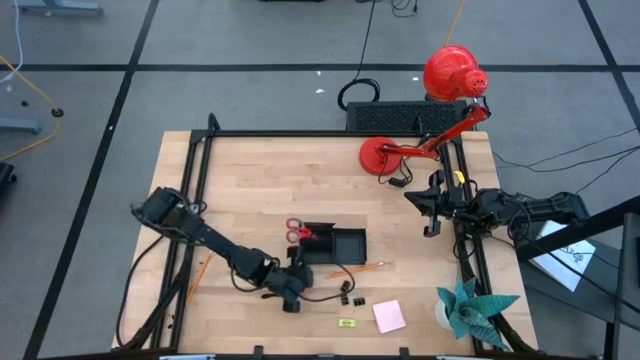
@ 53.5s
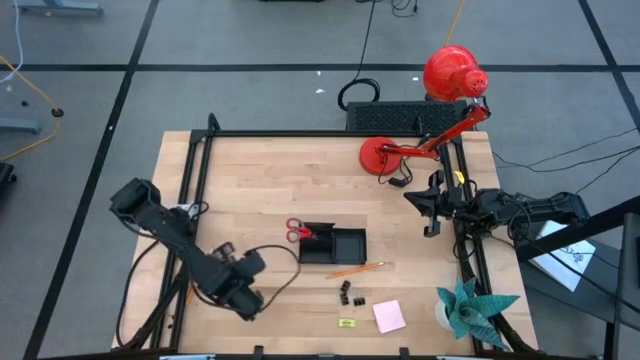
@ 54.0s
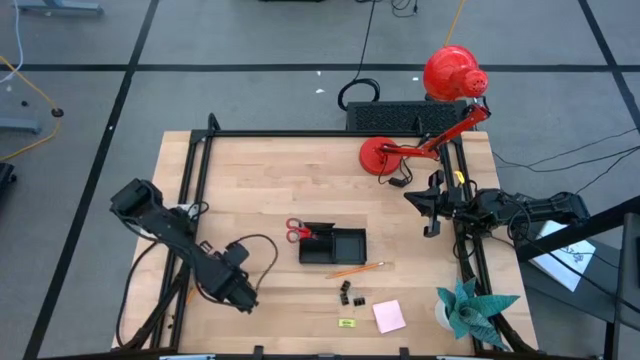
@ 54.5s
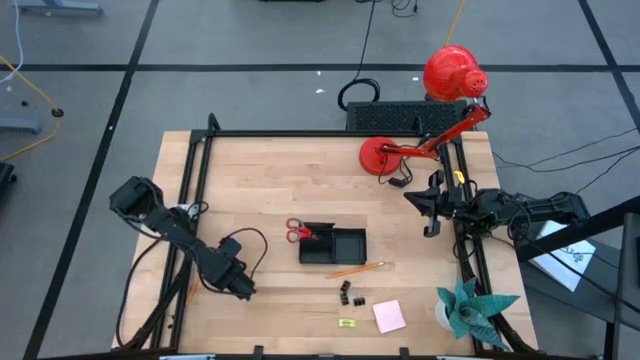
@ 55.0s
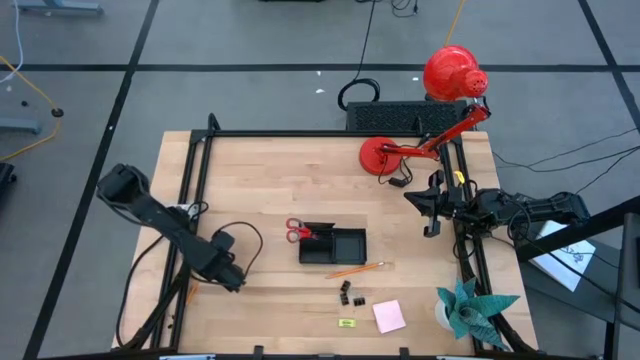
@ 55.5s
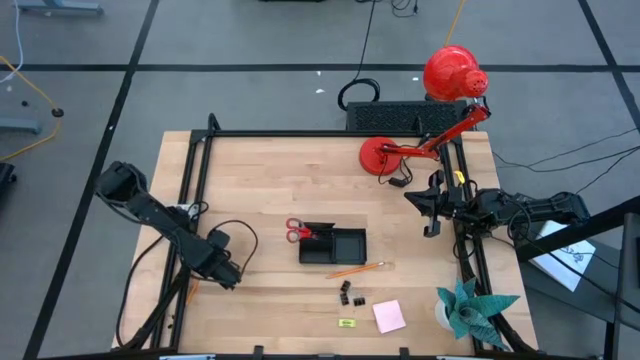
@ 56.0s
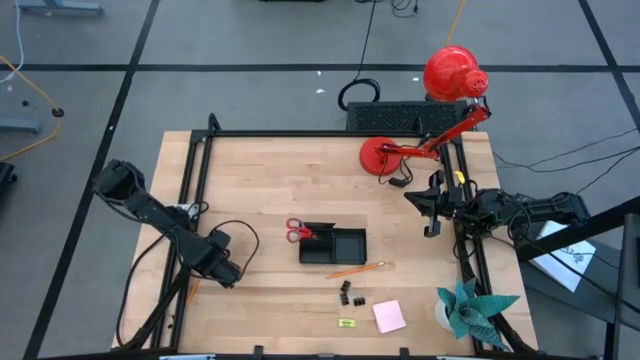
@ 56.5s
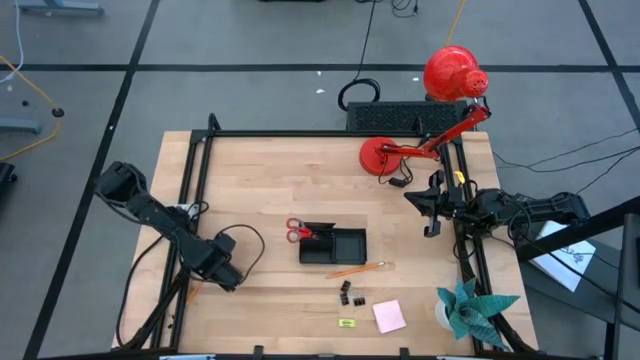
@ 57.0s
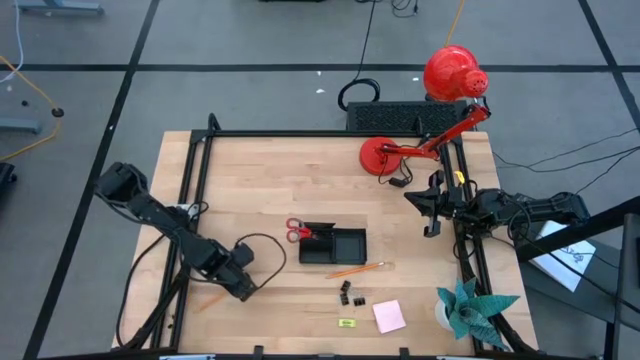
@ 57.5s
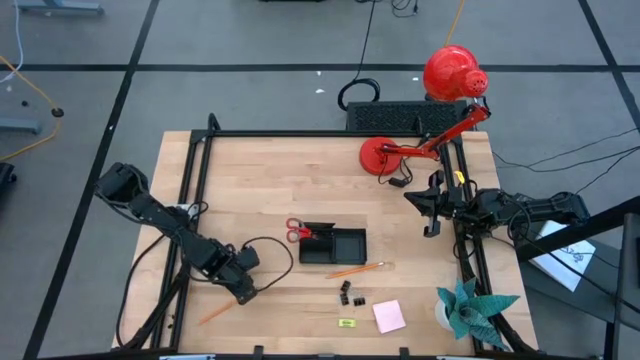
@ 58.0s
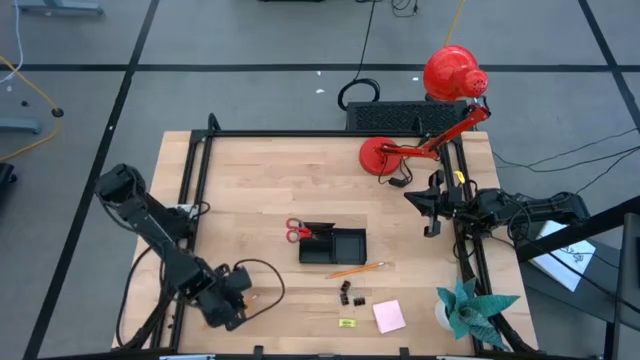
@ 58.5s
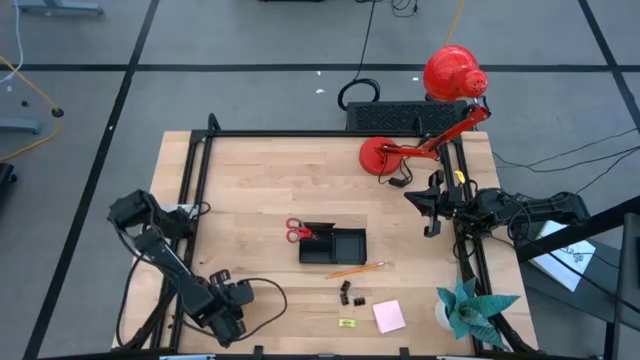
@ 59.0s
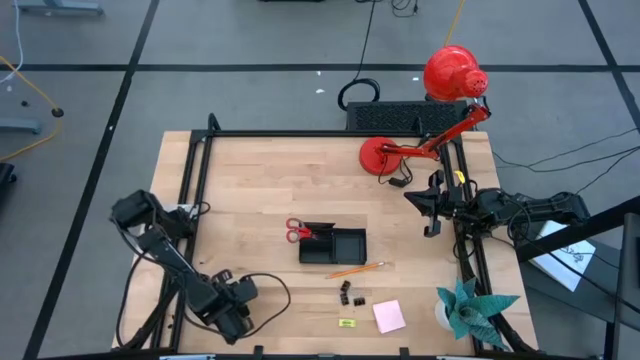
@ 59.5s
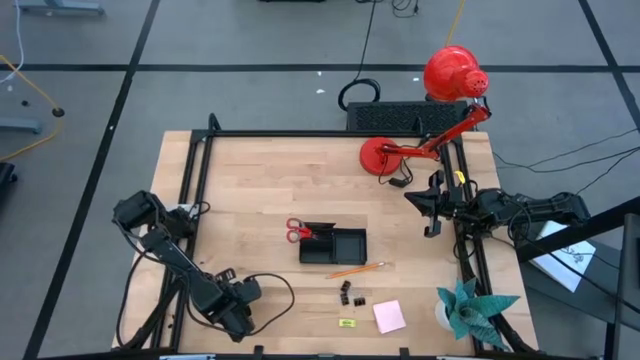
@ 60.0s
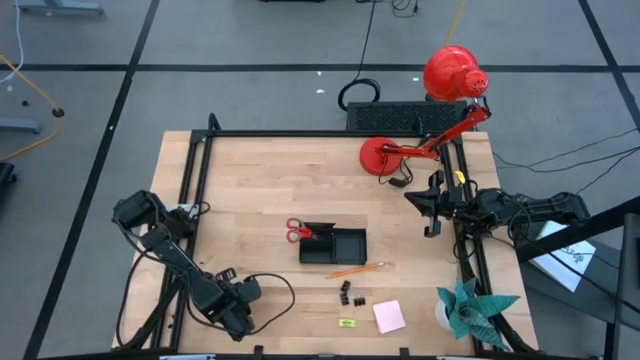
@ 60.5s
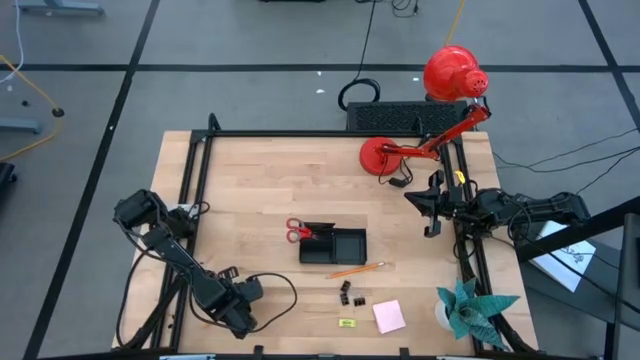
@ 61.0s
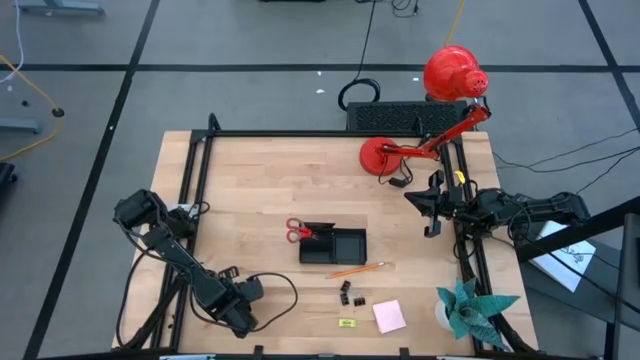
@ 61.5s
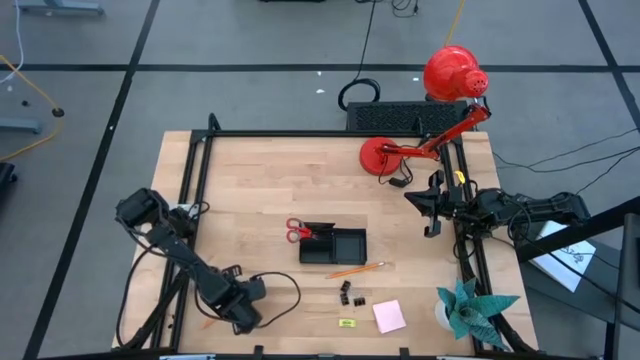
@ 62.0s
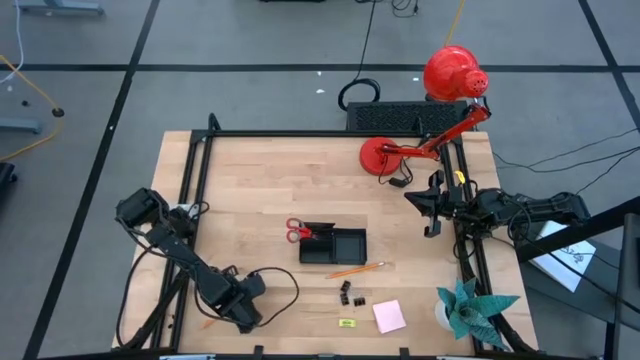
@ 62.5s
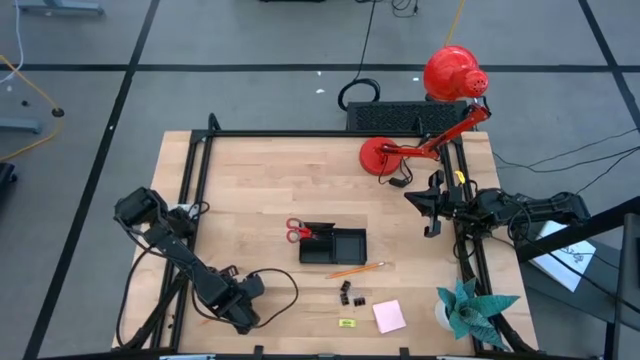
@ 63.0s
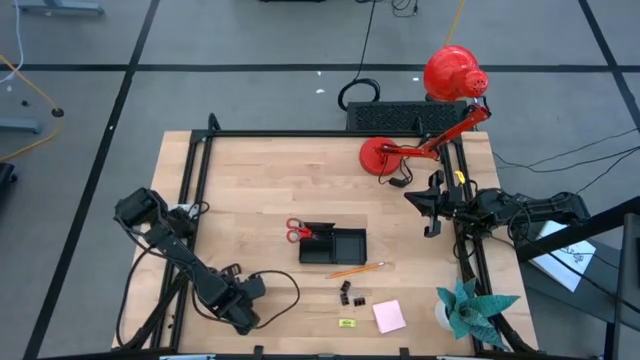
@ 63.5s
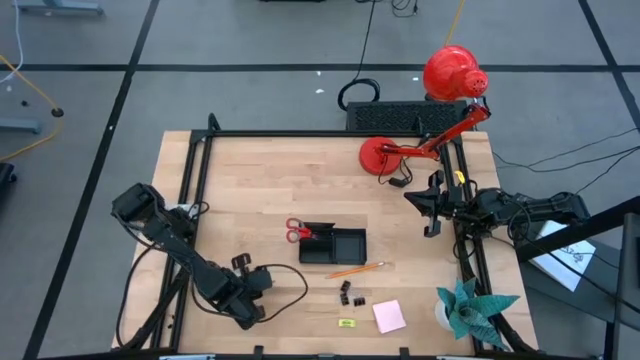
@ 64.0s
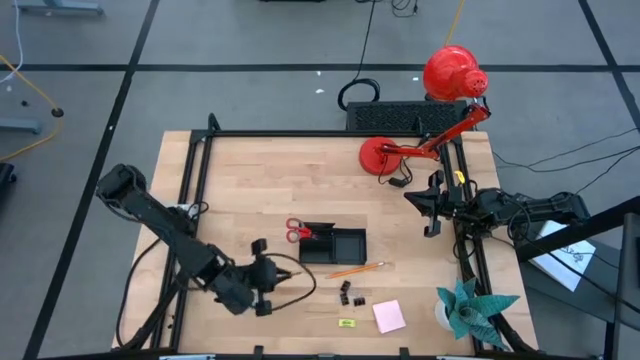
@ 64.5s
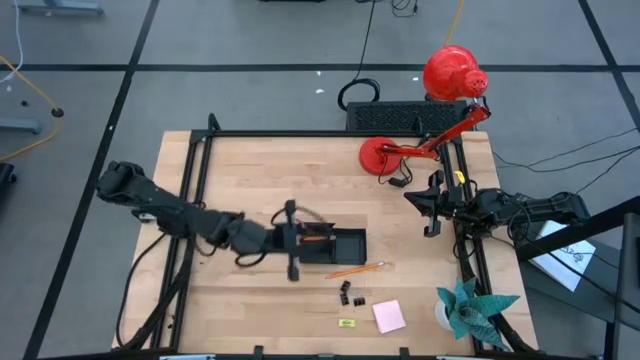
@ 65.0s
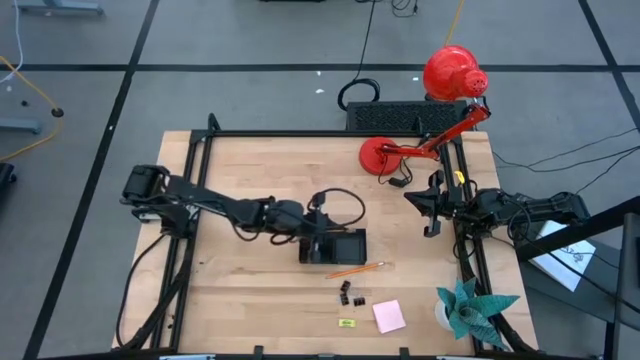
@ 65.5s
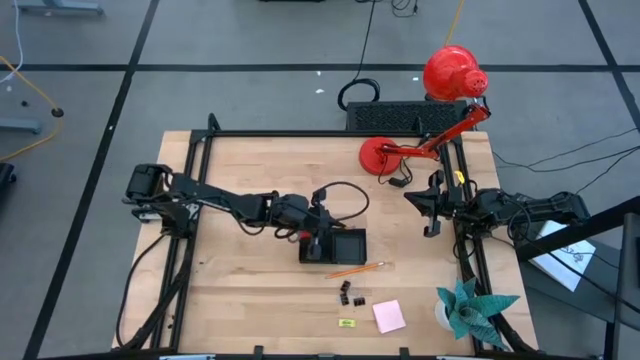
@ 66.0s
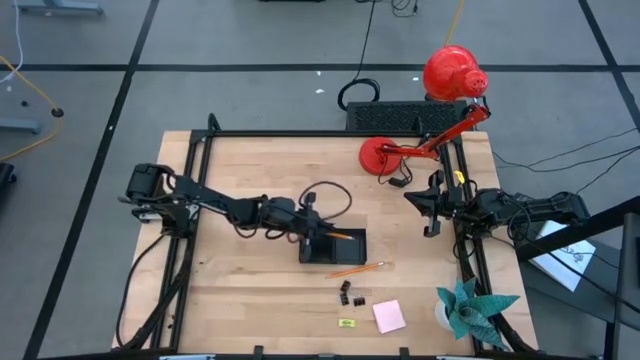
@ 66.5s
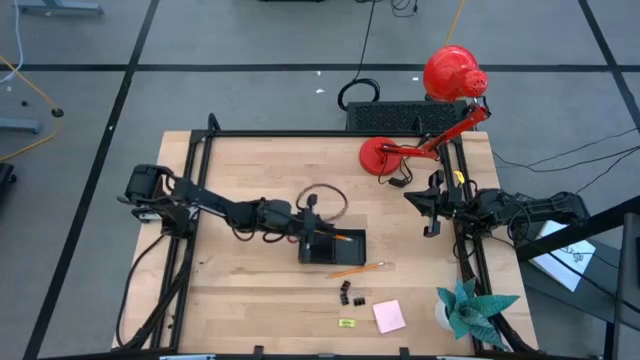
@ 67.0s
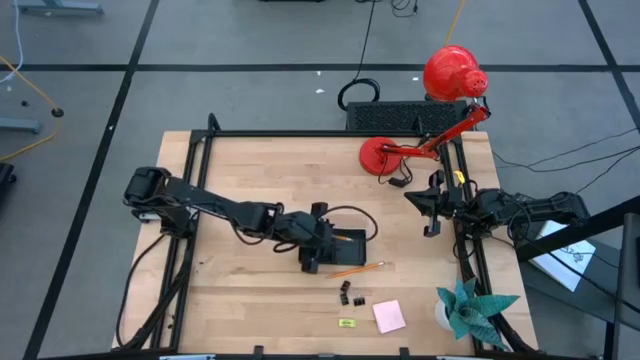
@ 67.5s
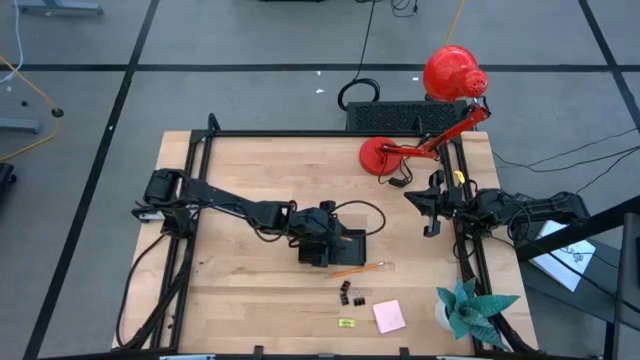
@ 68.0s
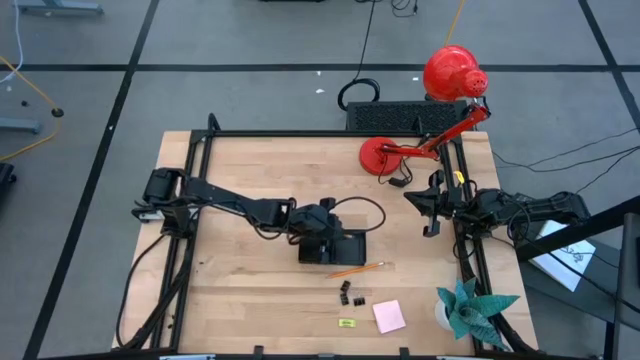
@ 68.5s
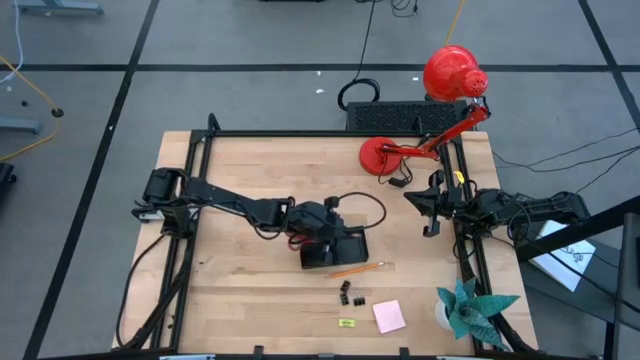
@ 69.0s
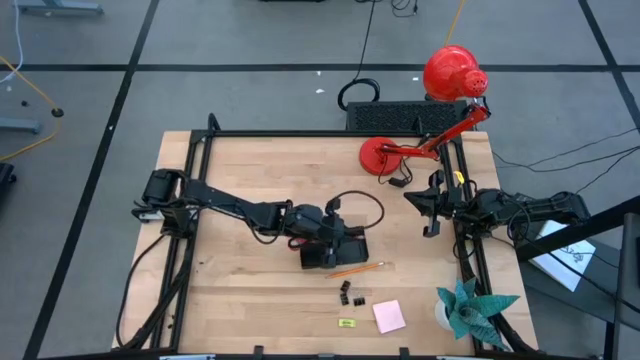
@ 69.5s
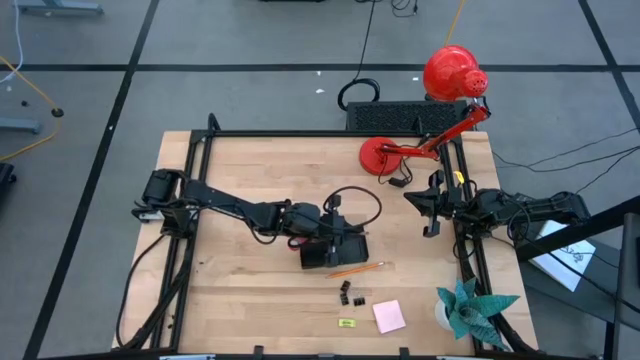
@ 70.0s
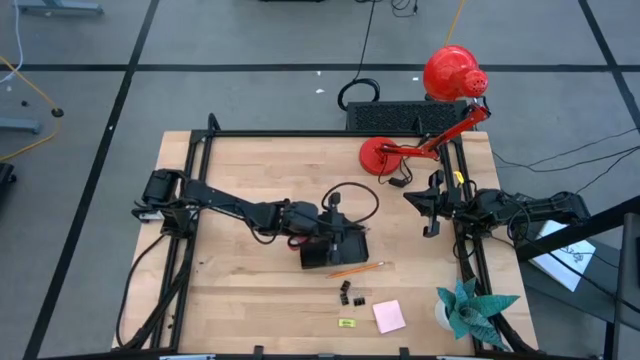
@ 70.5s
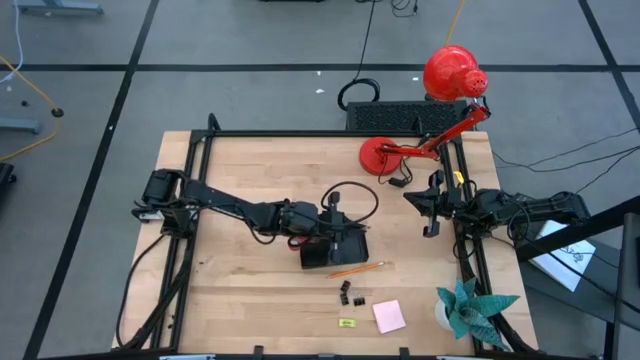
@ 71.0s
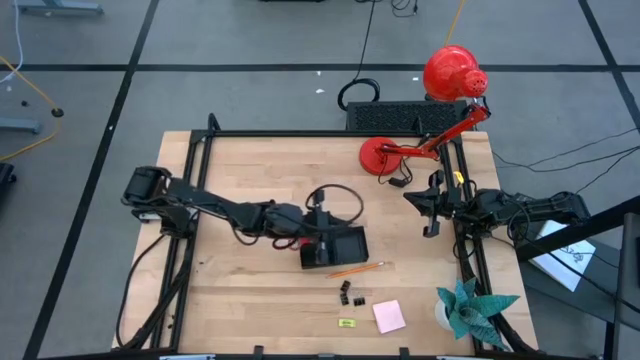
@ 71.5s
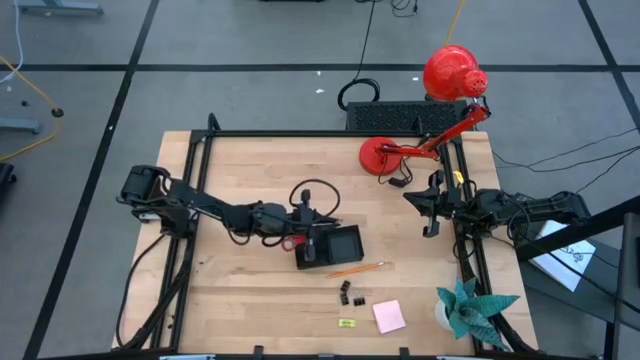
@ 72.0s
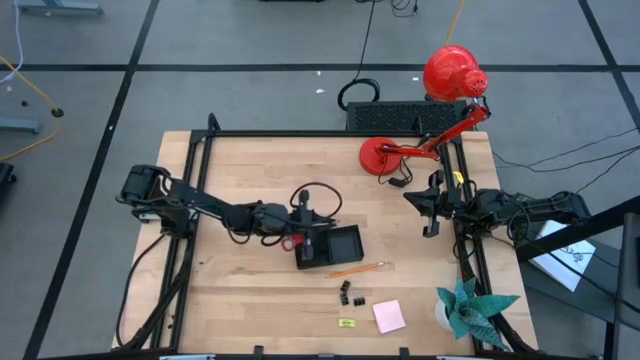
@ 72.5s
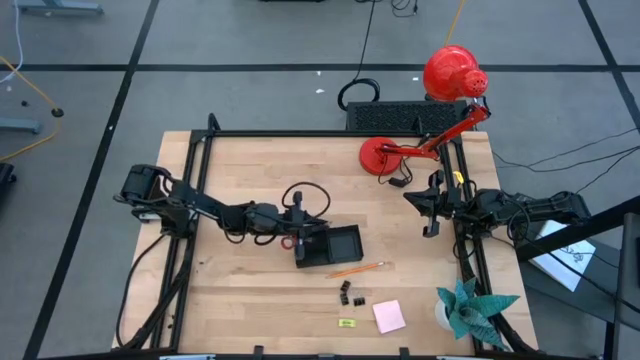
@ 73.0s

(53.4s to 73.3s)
Task: Pick and place office supplies into organizer
Put the left pencil into the top left compartment of the desk organizer

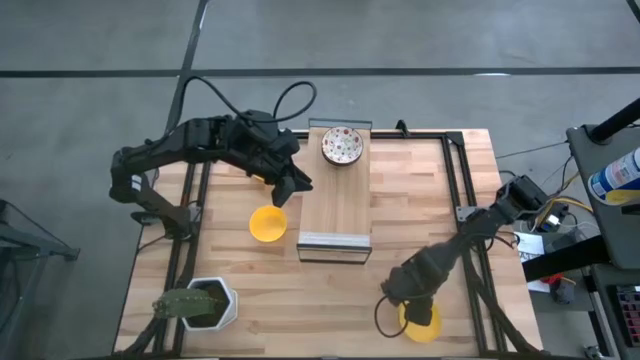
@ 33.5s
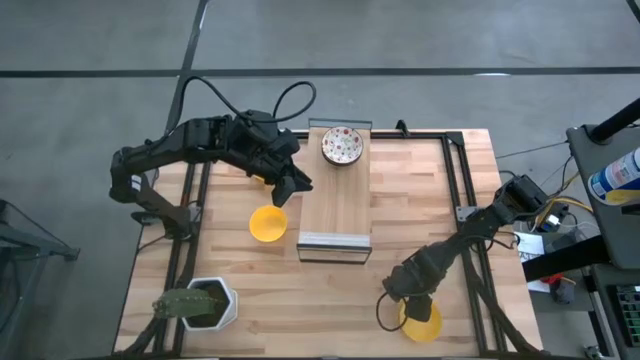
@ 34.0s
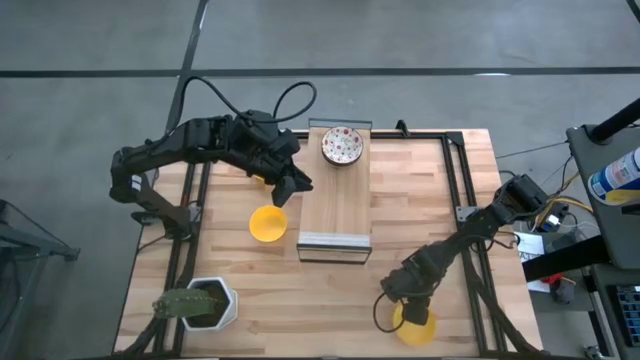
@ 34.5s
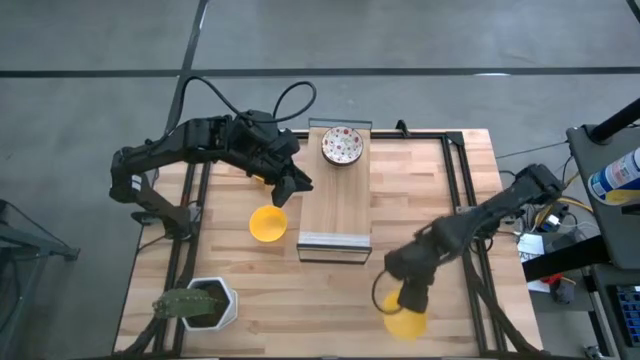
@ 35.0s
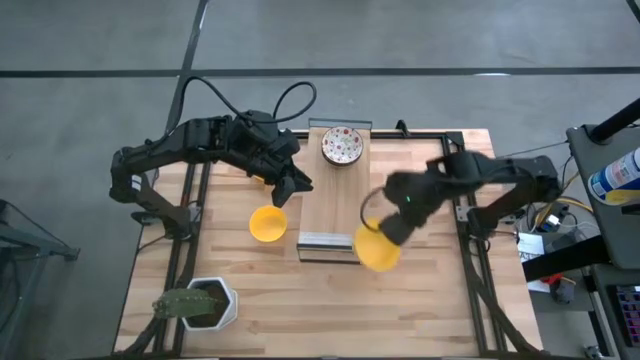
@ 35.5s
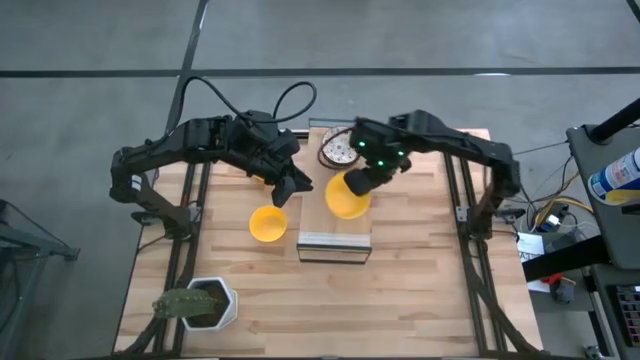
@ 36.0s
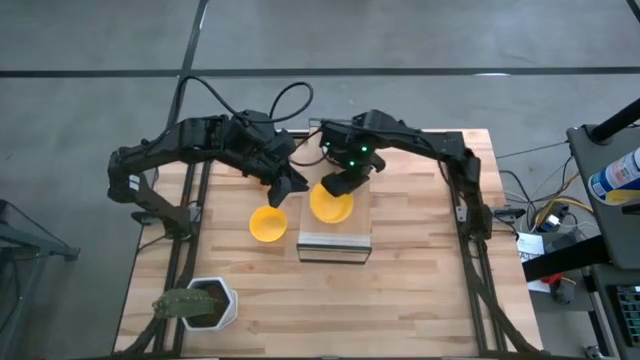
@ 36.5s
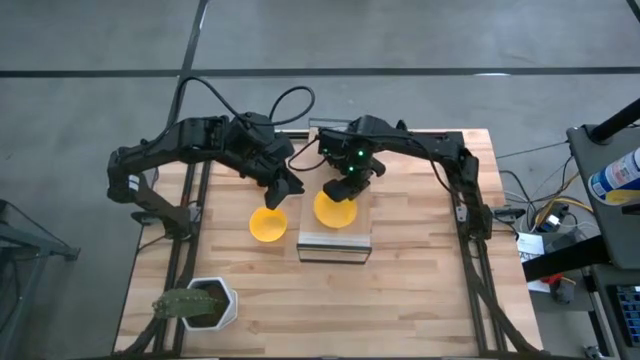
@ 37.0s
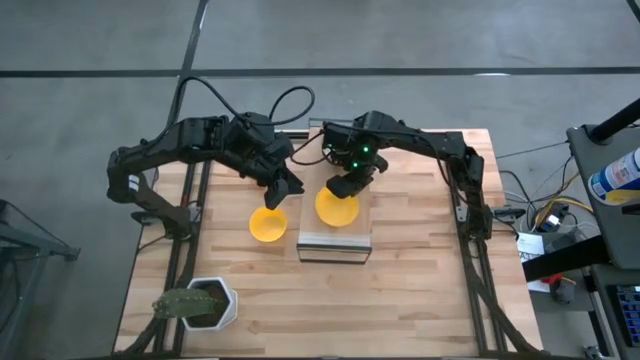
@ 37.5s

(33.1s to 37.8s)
Task: Pick & Place Mini bowls
Put the bottom yellow bowl on the shelf
